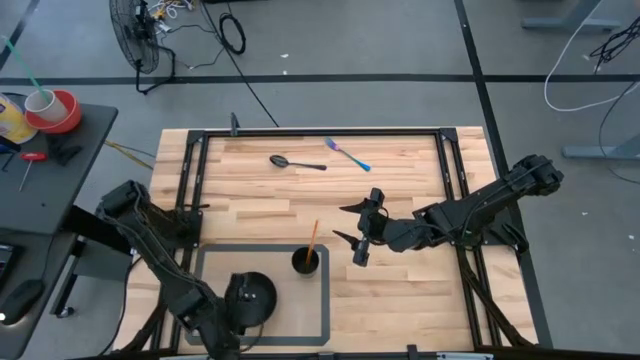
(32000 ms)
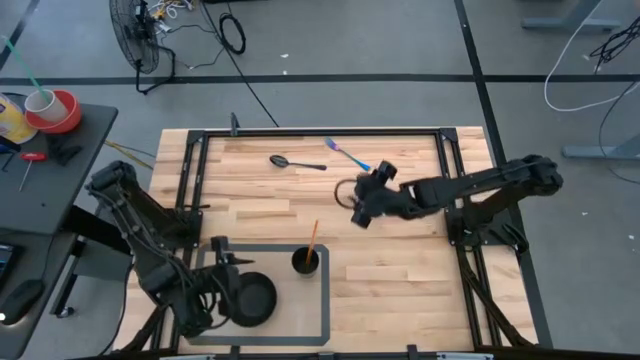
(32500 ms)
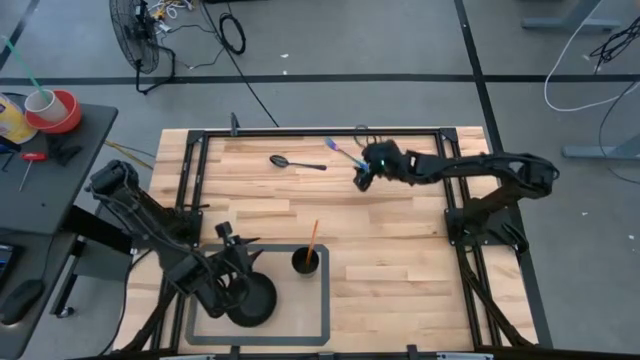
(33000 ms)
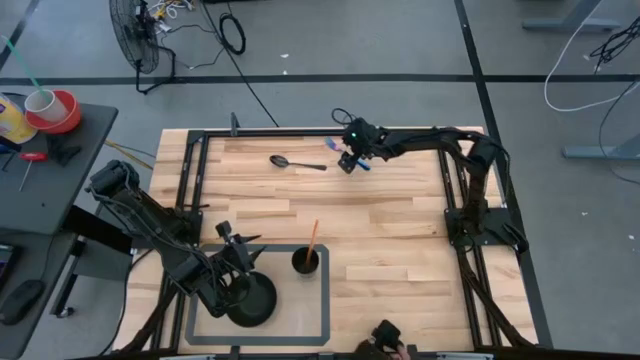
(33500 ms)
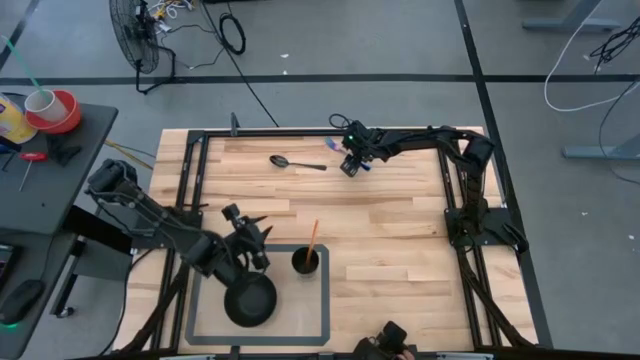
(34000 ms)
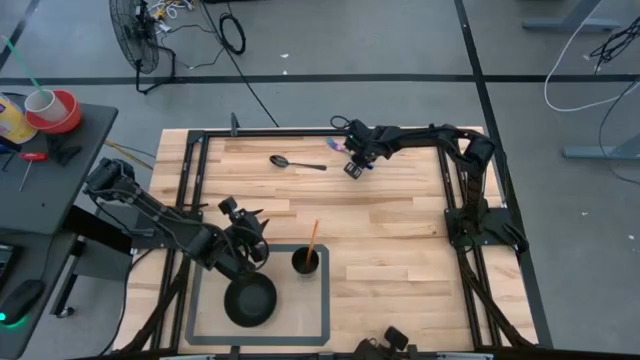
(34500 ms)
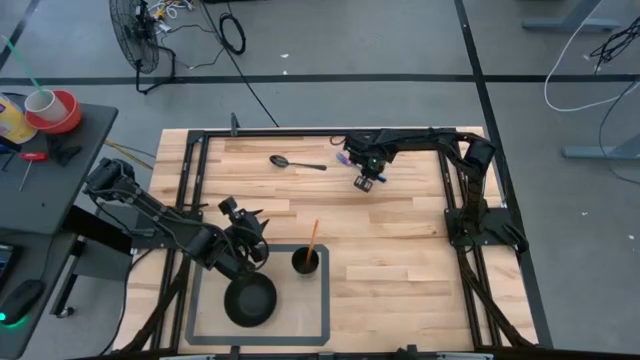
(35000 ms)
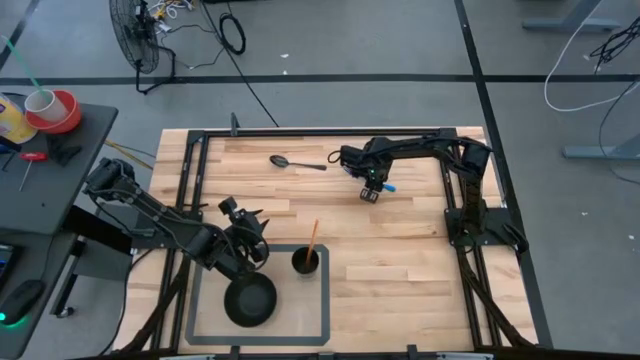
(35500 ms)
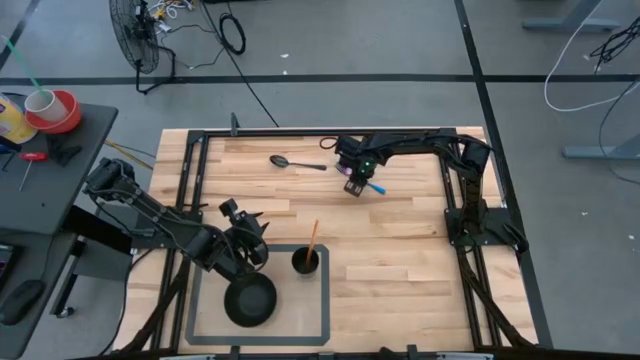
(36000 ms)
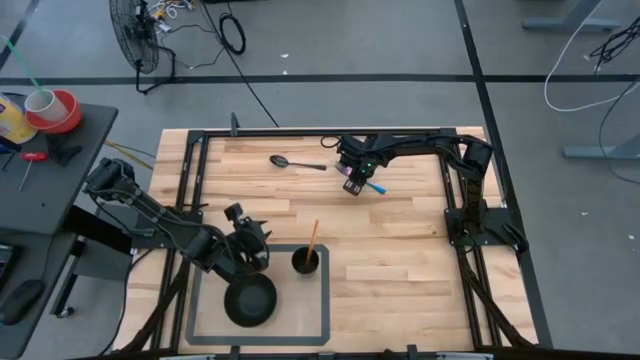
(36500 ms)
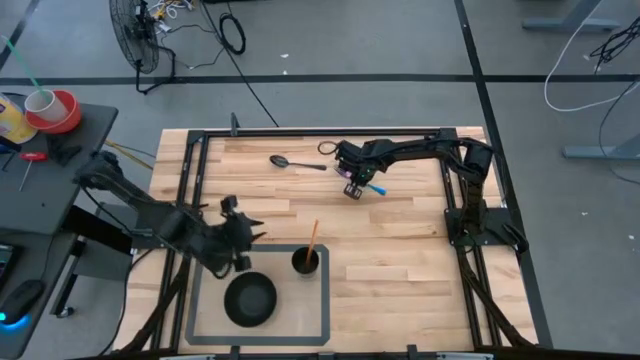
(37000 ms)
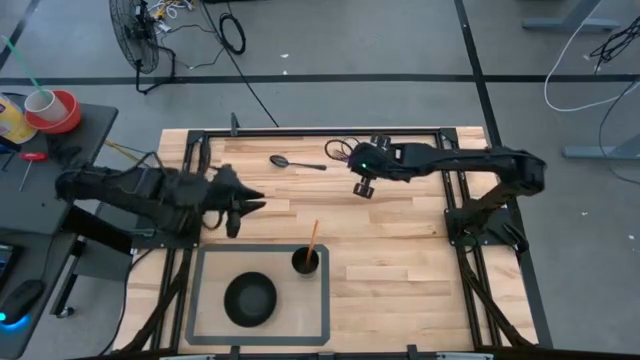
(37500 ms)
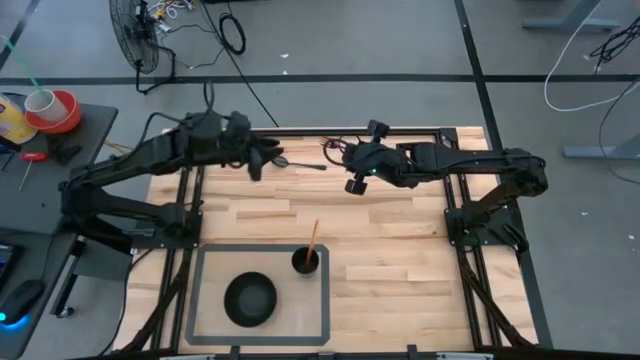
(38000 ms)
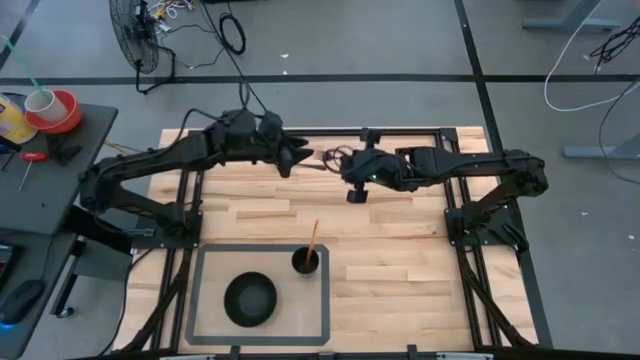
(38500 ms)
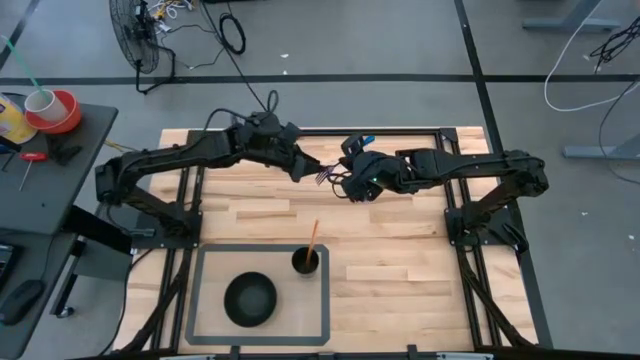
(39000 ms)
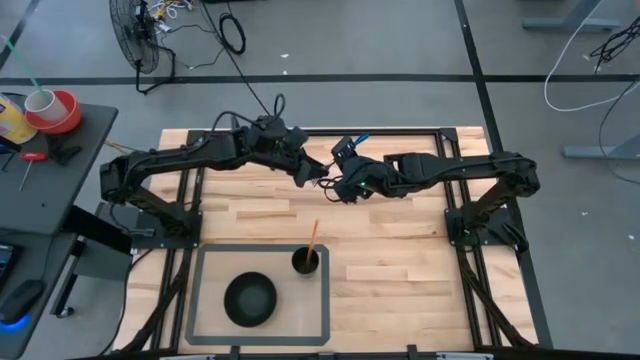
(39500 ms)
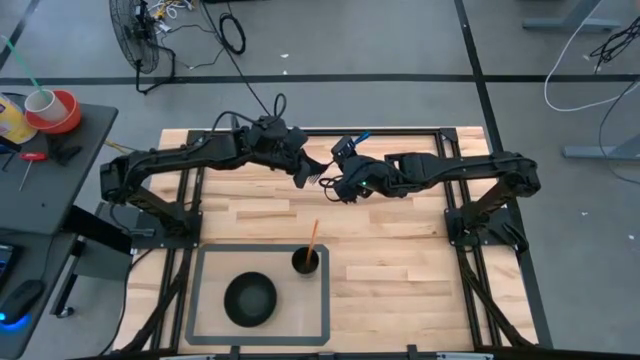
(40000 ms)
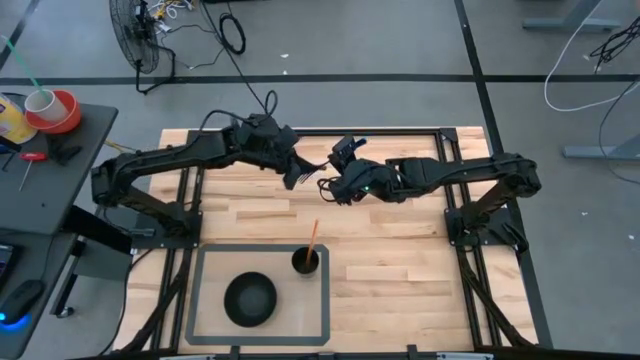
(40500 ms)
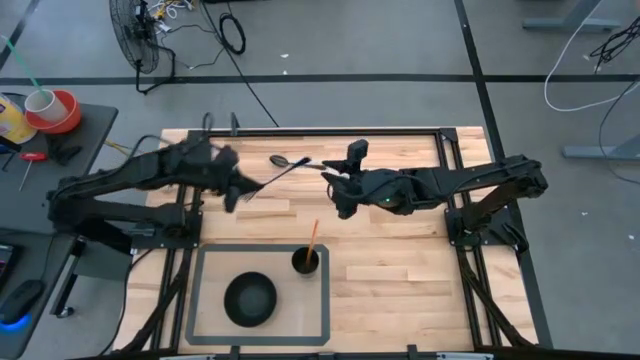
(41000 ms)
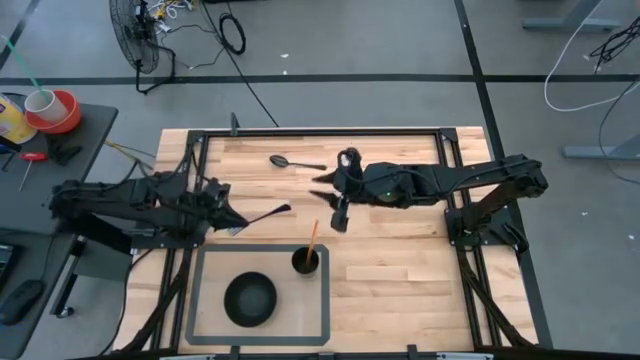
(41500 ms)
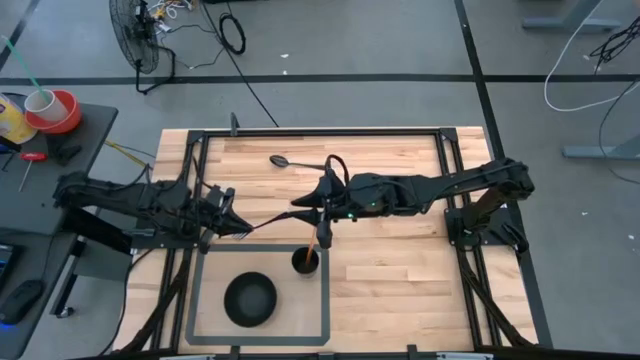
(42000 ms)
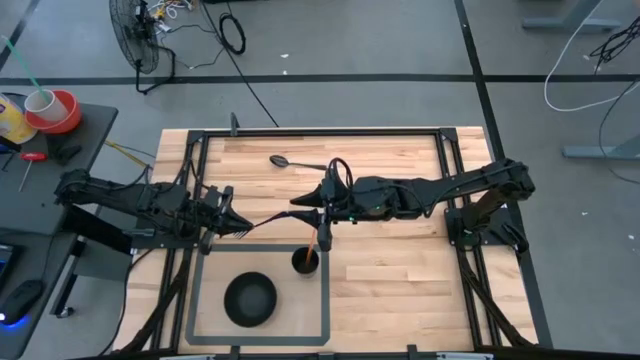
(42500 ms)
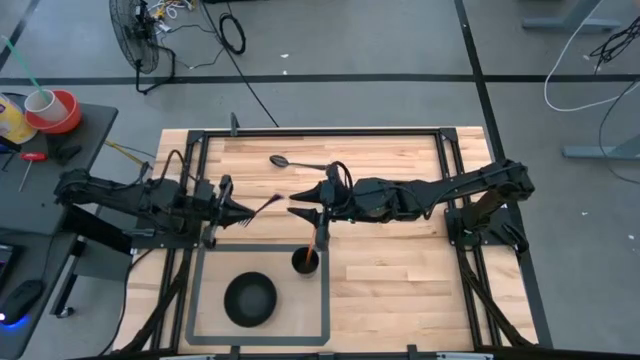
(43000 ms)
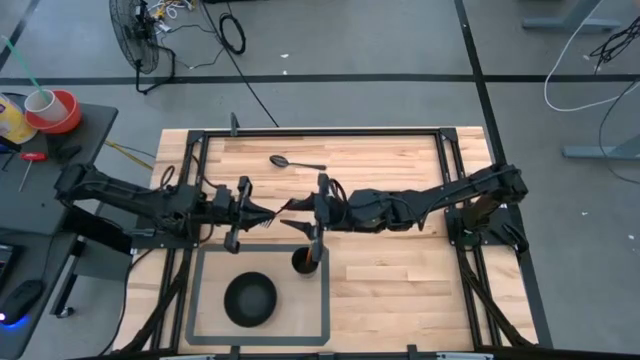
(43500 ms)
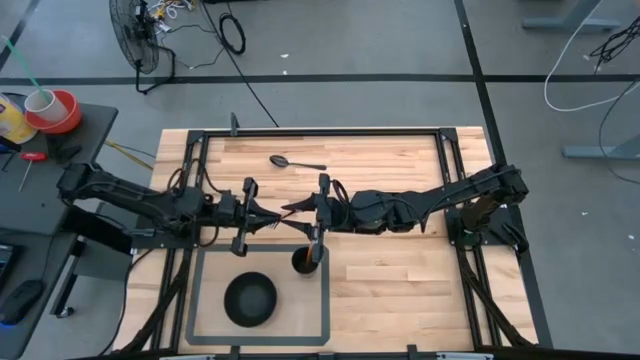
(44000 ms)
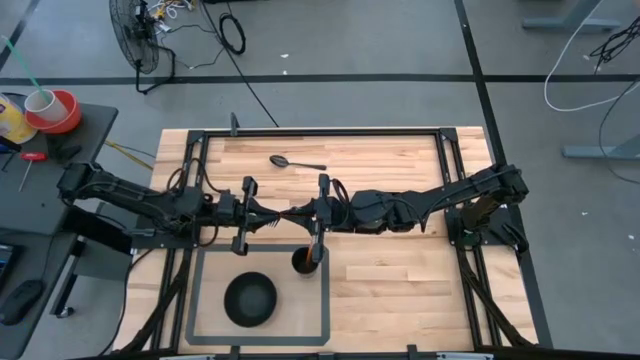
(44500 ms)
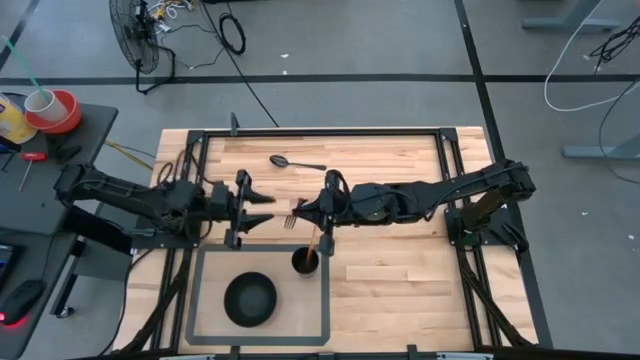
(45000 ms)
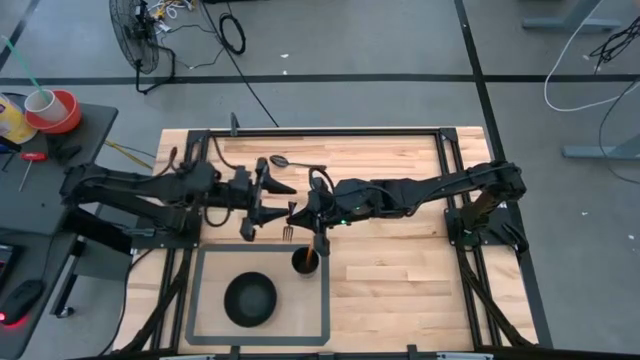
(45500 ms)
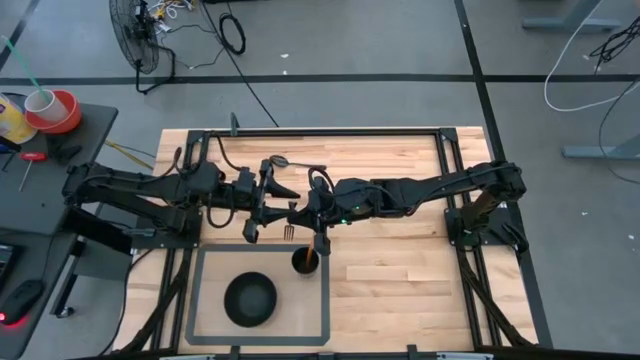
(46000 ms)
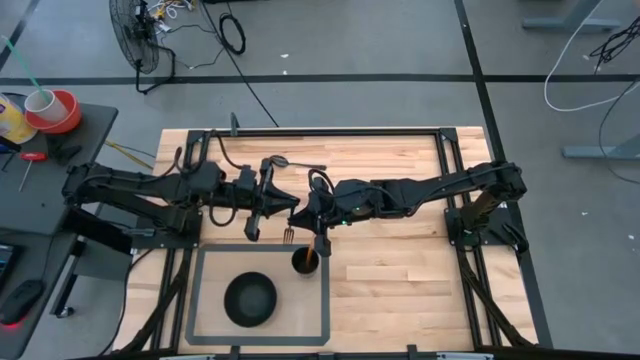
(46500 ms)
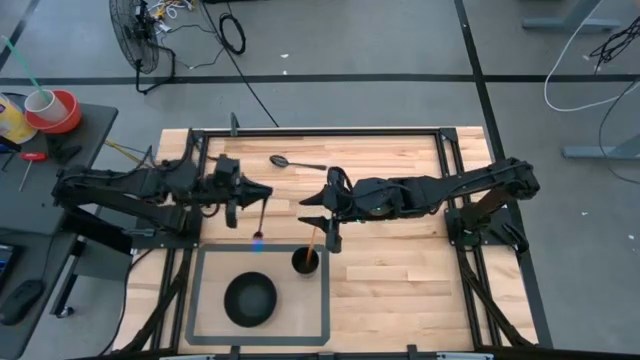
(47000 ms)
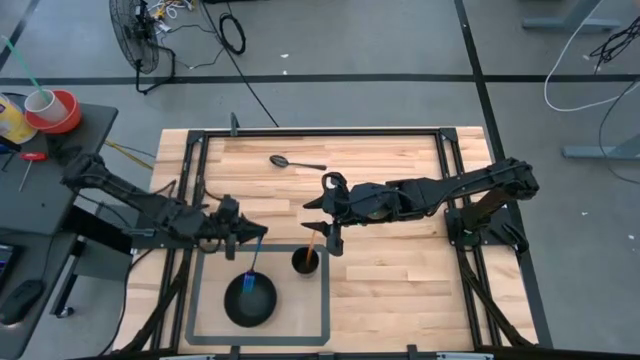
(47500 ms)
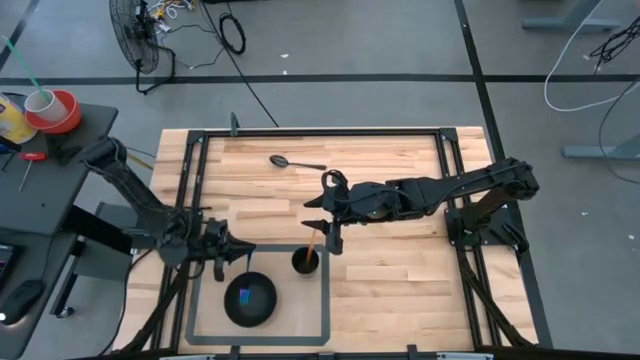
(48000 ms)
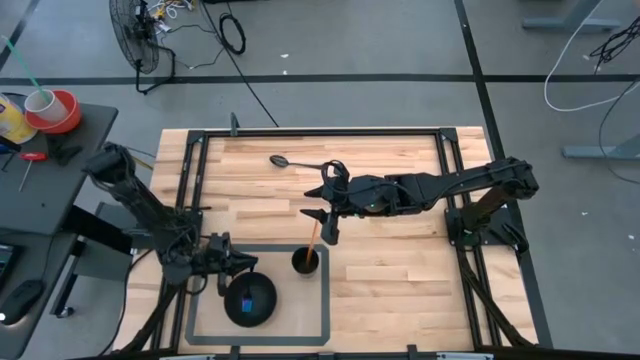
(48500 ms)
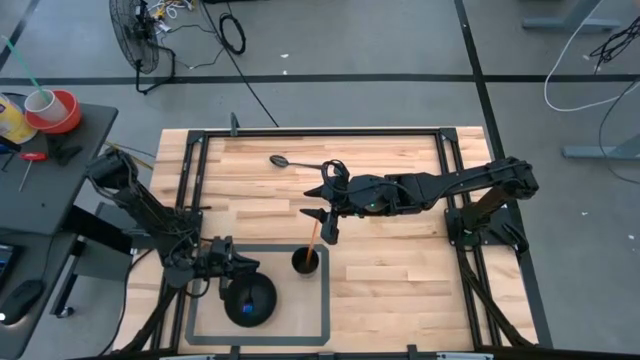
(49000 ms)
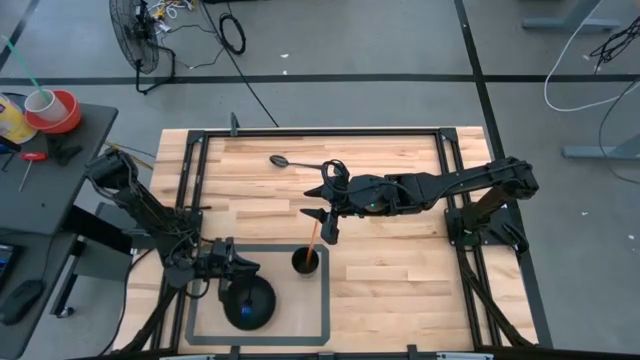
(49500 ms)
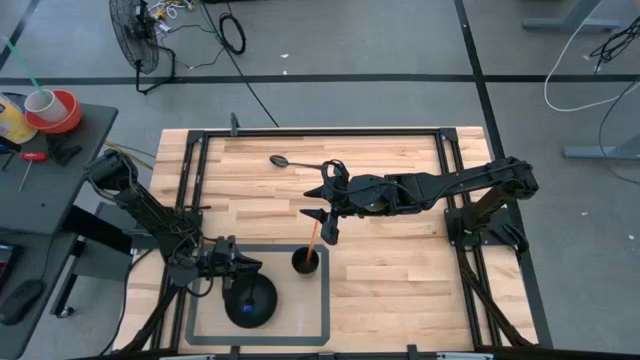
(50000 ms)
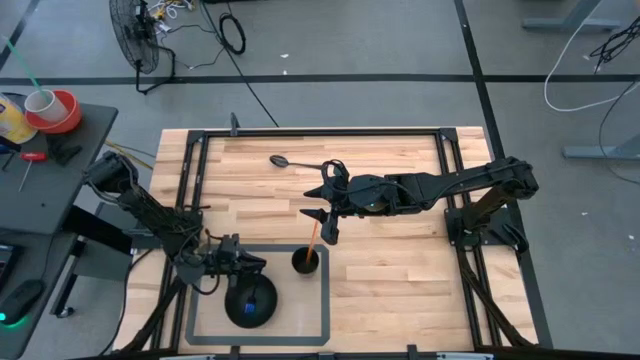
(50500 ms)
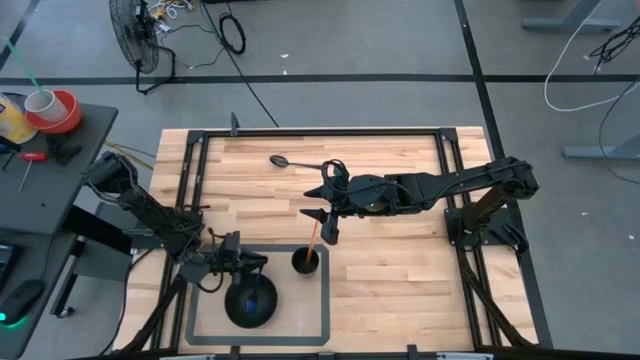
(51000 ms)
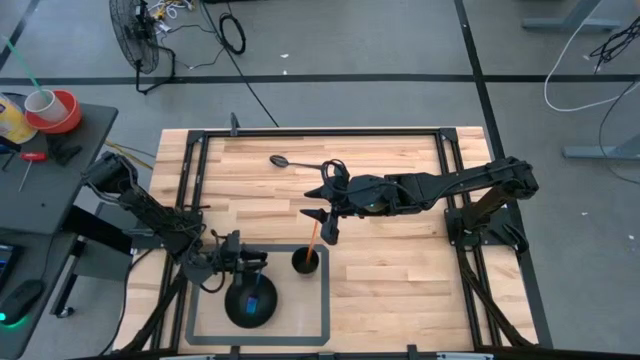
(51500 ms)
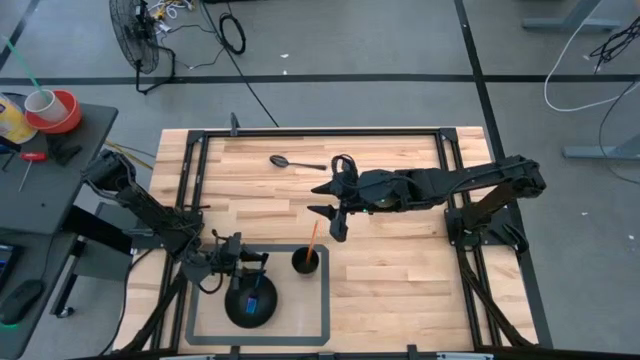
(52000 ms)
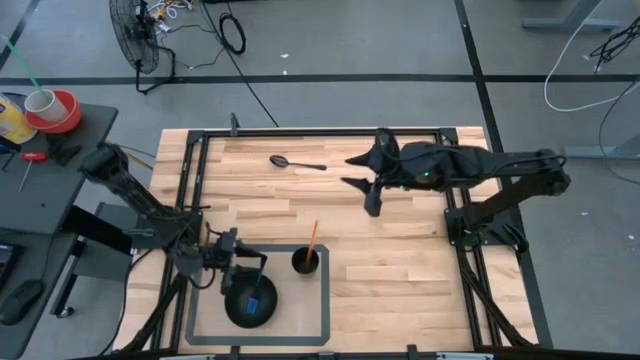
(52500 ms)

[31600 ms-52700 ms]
Task: Pick & Place Utensil
Put the blue fork into the black bowl
